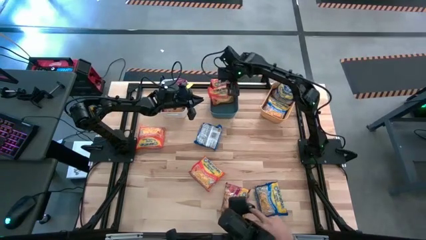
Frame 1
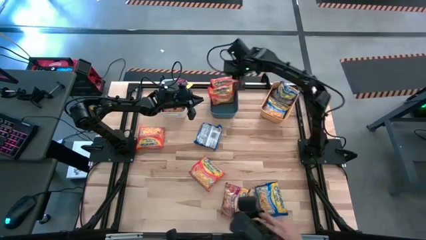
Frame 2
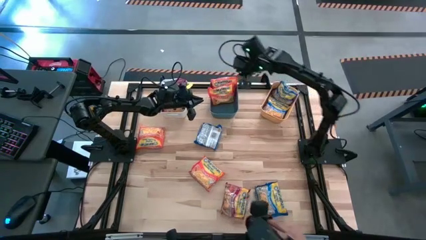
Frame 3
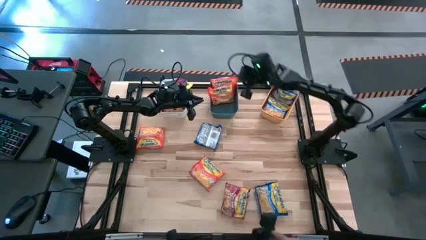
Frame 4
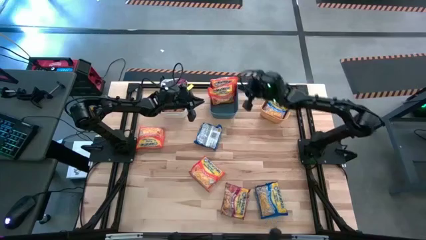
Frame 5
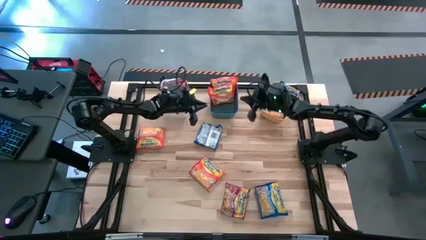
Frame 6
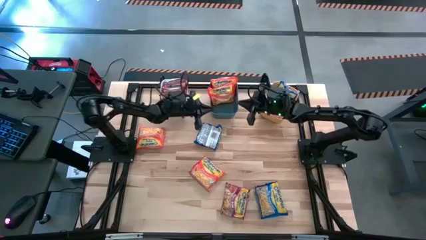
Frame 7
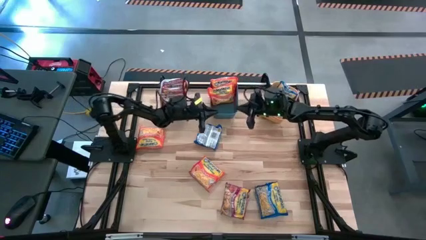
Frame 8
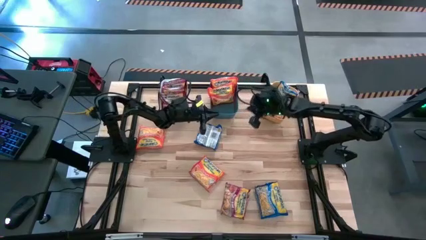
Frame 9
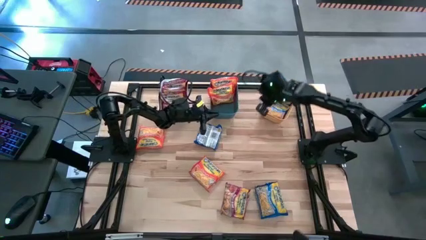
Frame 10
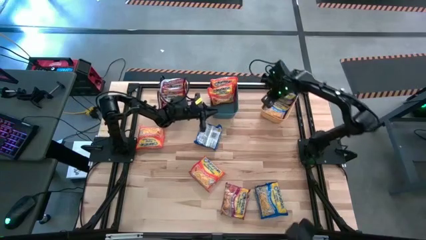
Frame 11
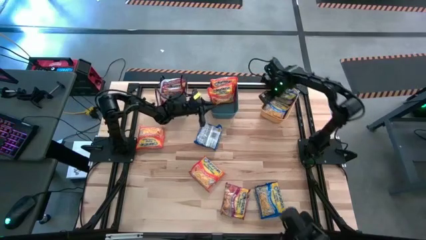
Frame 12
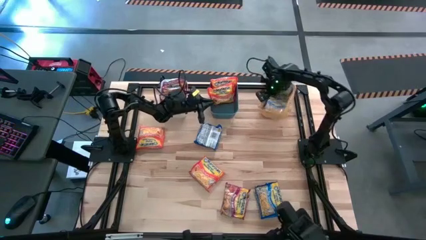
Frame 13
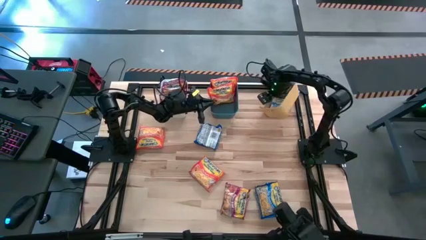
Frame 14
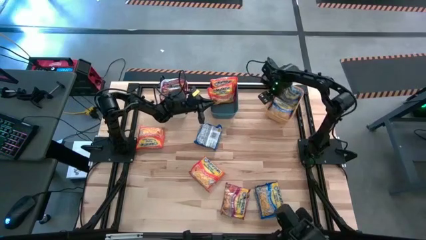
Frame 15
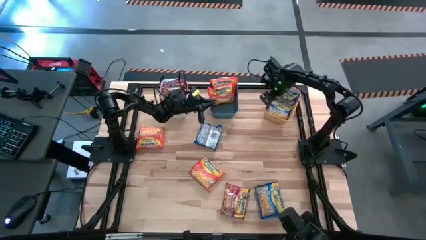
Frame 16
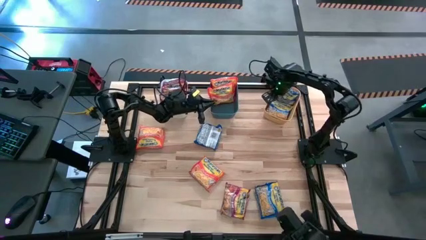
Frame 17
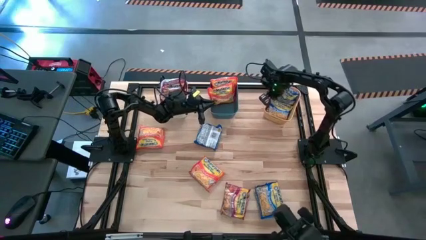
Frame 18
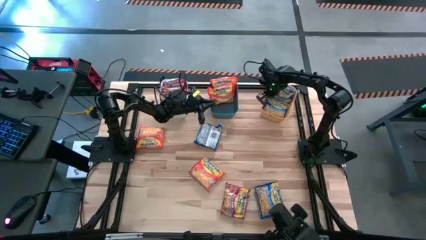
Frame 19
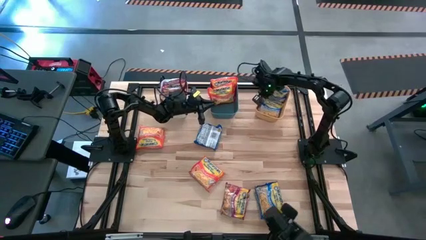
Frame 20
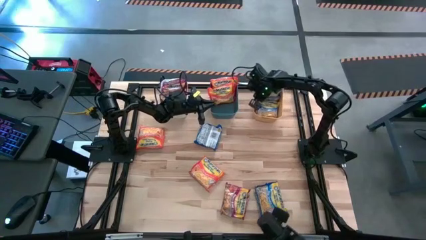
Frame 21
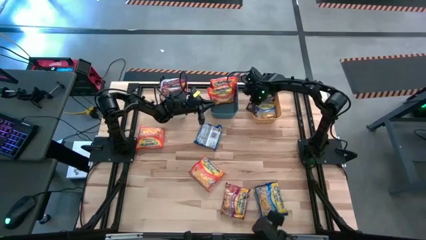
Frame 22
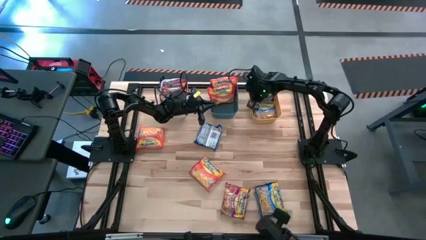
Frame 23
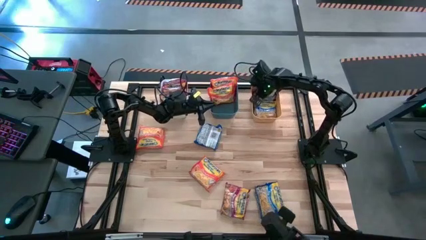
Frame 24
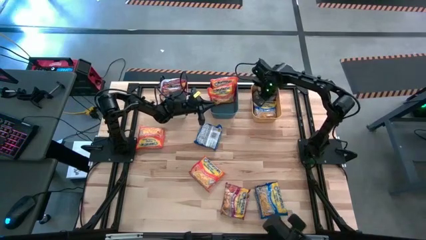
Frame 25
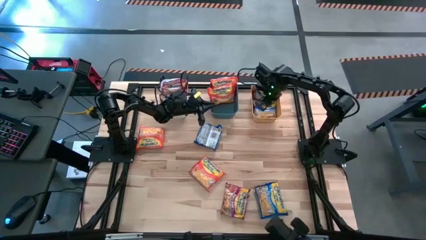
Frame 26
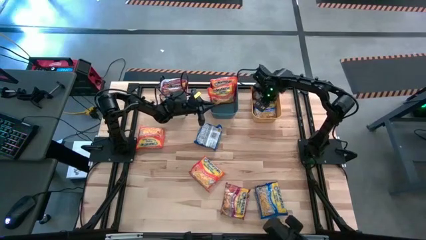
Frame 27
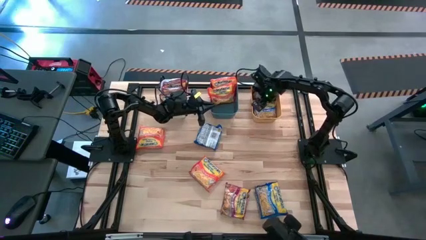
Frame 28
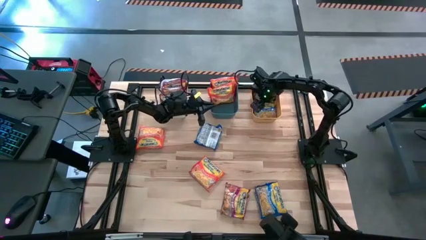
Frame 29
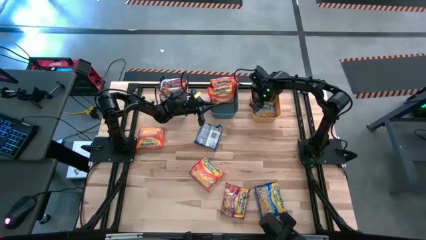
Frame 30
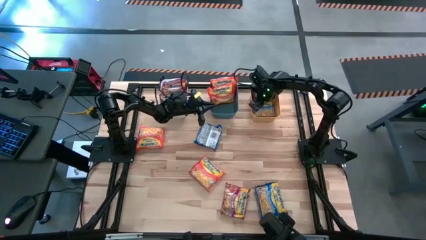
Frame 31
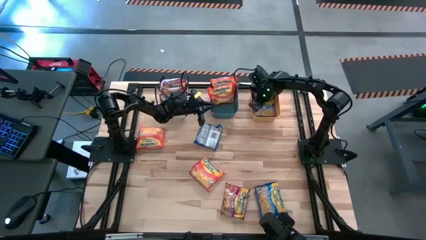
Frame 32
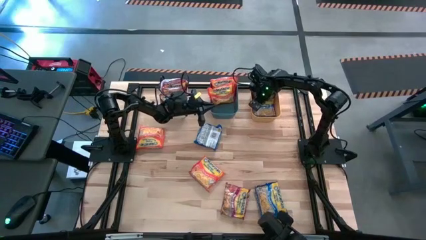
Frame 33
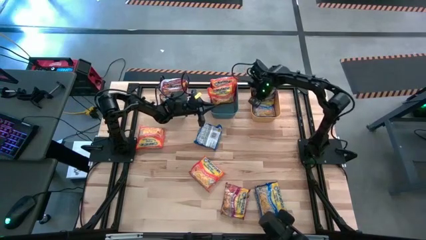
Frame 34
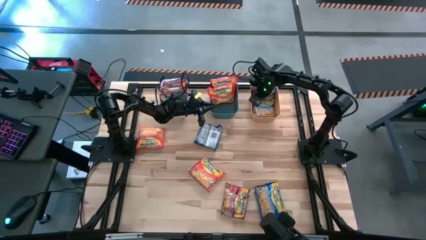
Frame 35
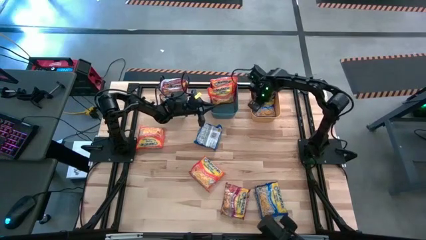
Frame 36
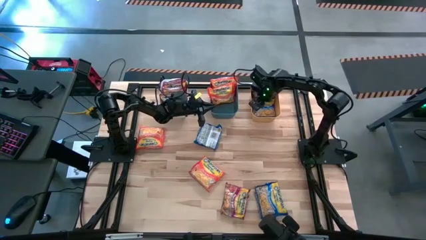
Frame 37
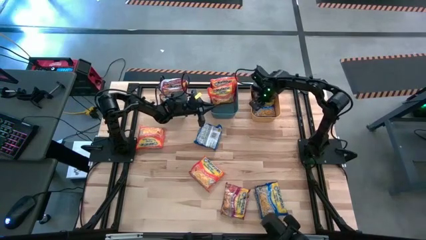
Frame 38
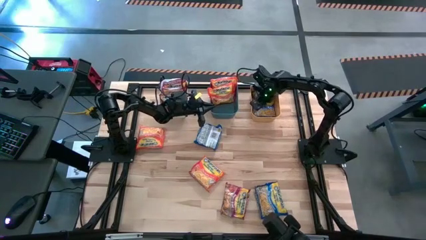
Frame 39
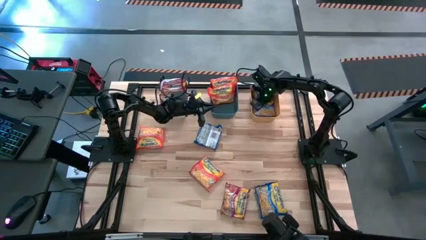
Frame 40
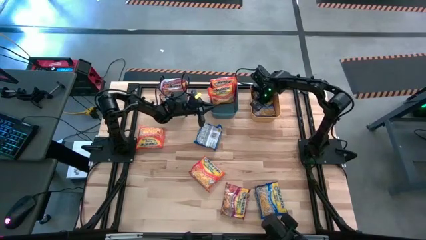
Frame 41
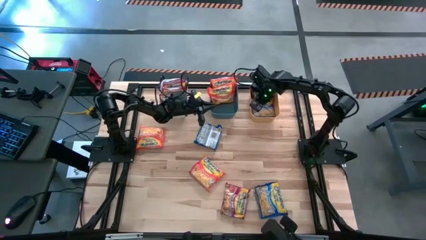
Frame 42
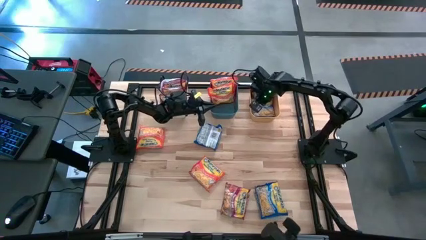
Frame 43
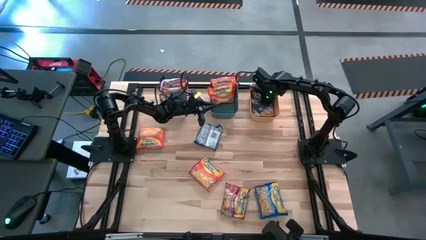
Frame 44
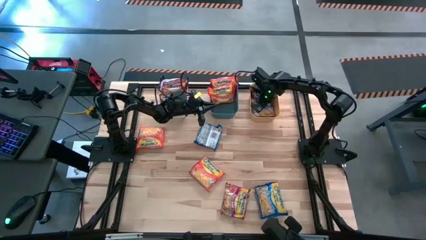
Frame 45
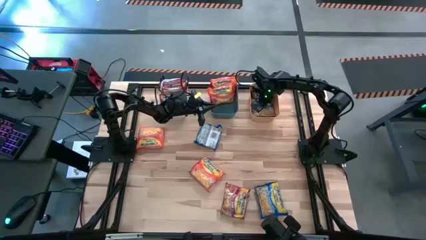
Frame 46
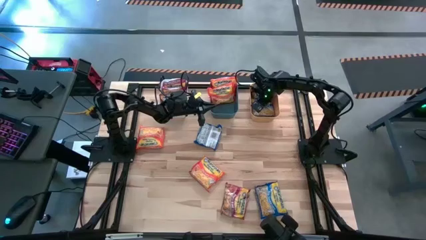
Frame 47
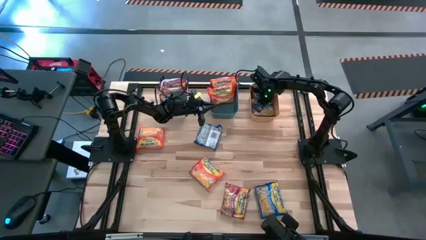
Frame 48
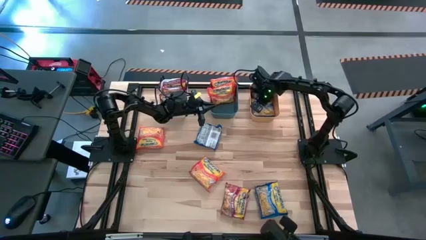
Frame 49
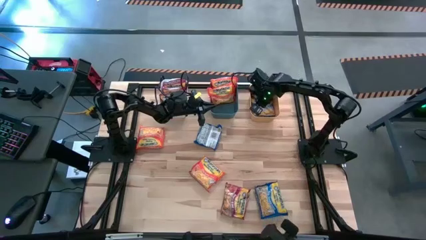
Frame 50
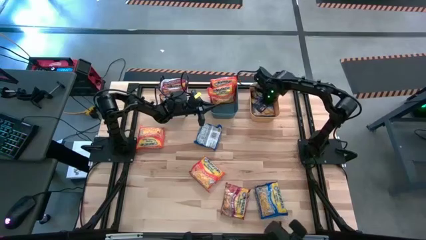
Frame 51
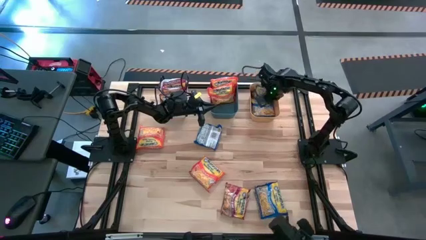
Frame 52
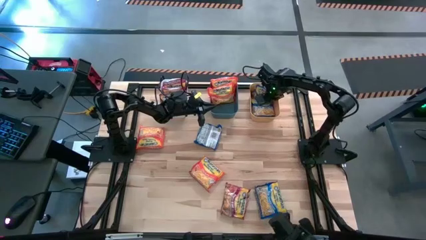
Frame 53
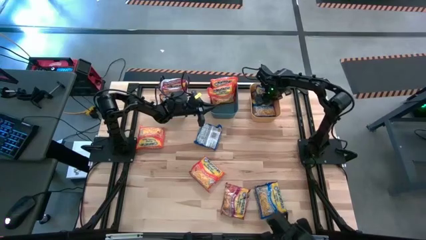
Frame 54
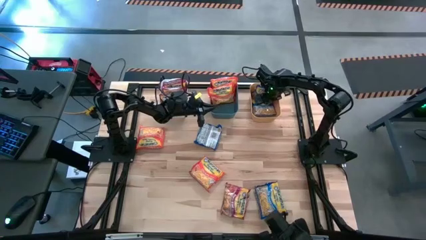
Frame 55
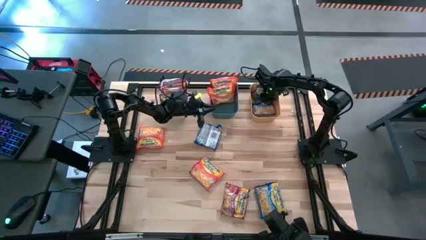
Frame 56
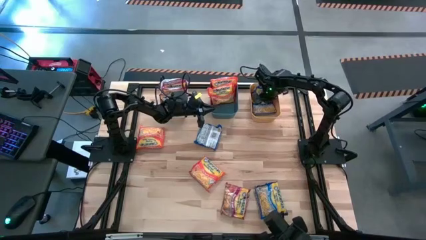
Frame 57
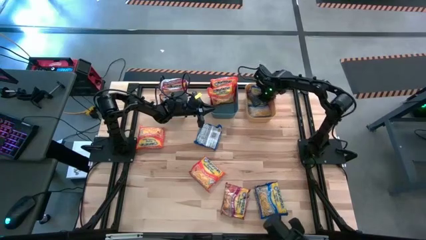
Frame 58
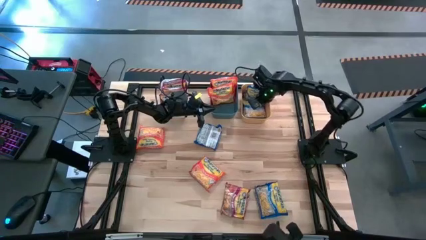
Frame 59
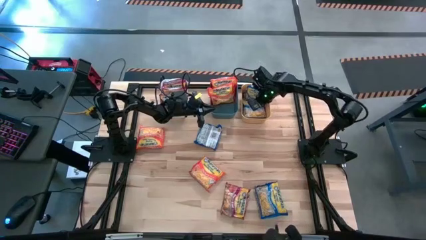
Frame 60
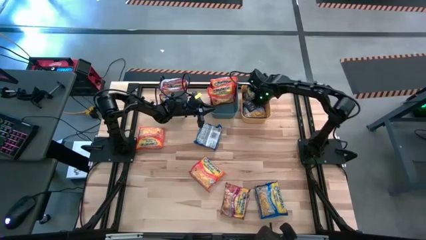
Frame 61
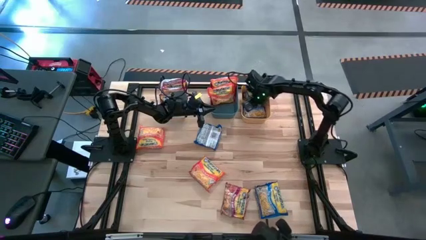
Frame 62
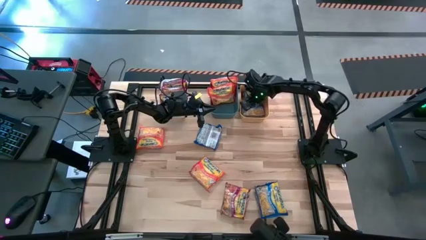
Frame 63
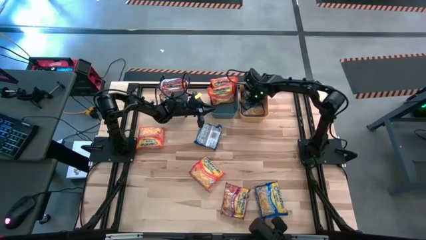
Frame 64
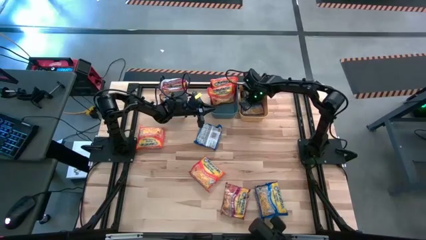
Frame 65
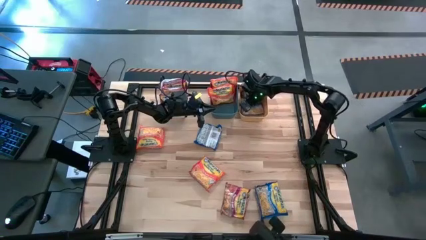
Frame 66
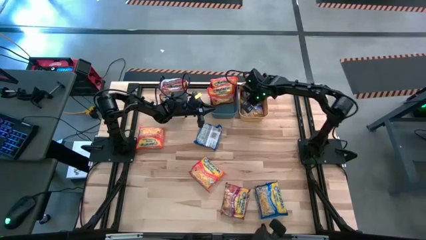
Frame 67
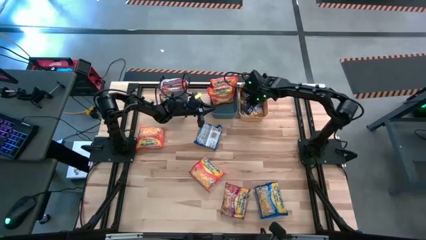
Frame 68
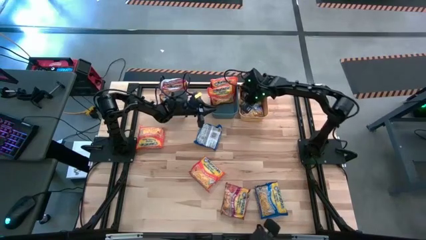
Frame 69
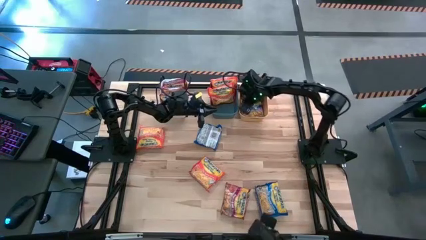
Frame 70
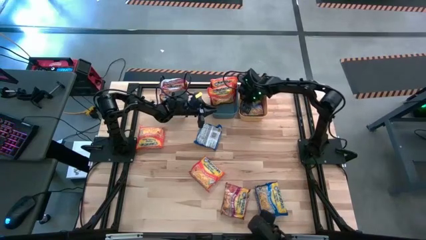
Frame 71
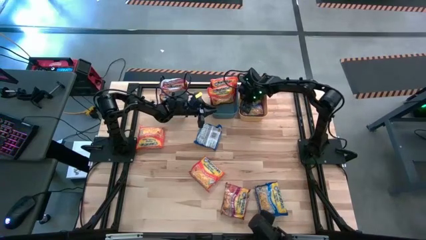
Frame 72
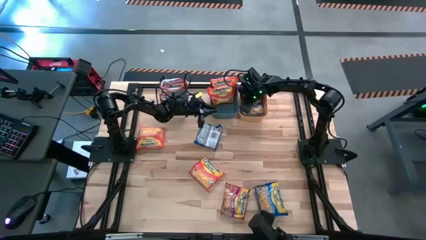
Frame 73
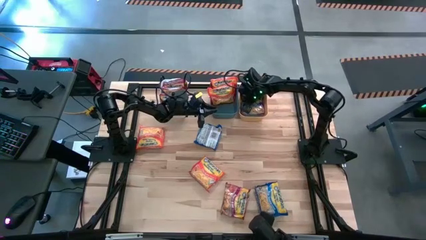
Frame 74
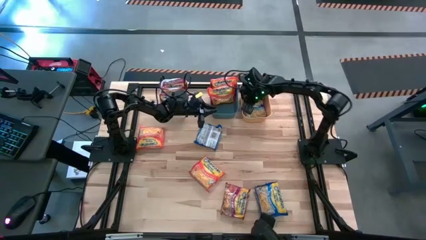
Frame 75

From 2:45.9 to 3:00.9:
Task: Sort Maruchan noodles
Adjust the blue noodle pack into the yellow bin
